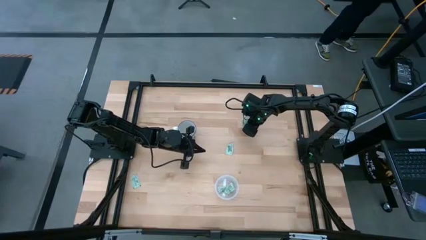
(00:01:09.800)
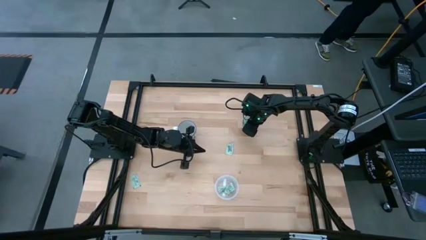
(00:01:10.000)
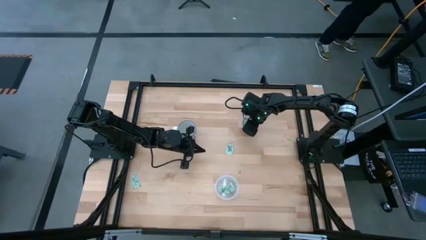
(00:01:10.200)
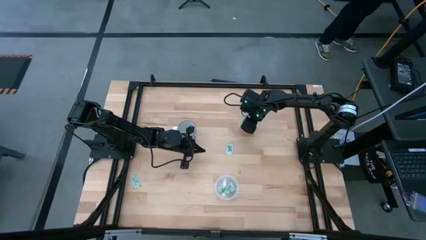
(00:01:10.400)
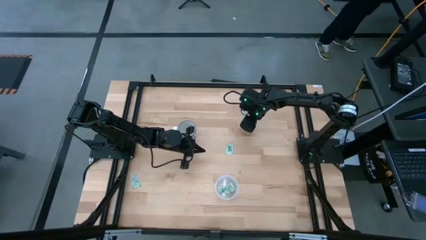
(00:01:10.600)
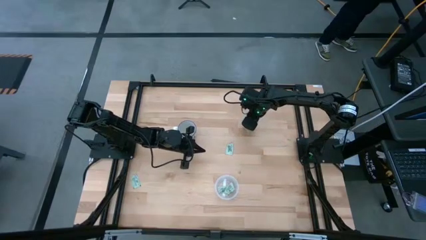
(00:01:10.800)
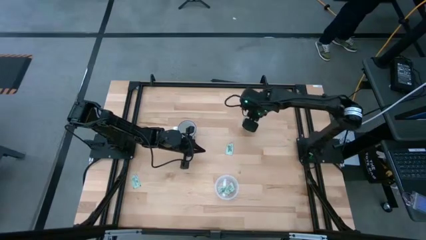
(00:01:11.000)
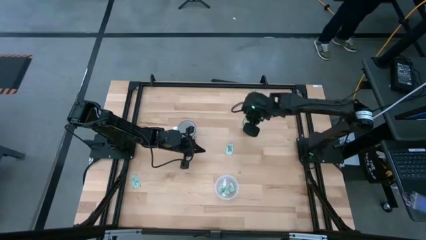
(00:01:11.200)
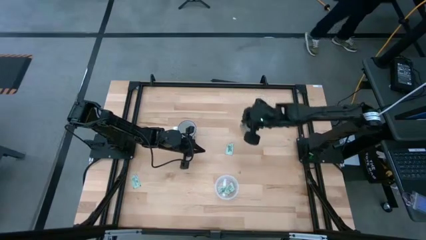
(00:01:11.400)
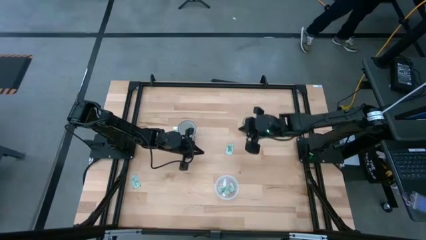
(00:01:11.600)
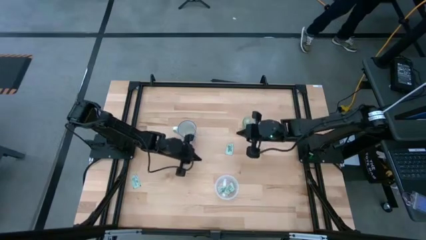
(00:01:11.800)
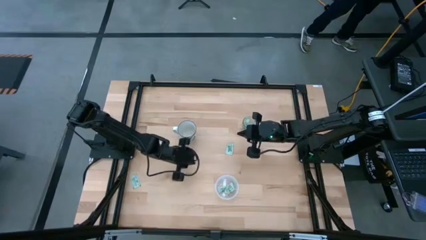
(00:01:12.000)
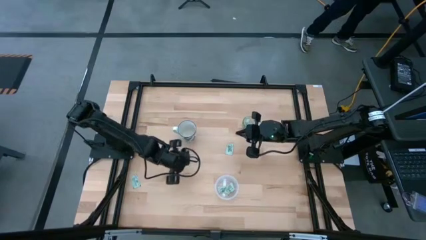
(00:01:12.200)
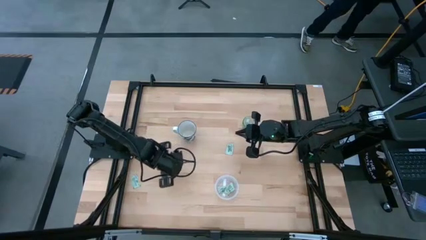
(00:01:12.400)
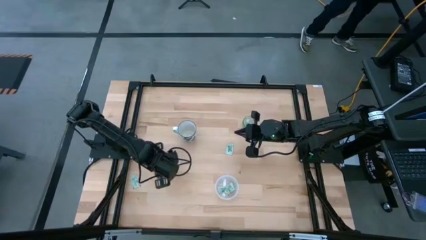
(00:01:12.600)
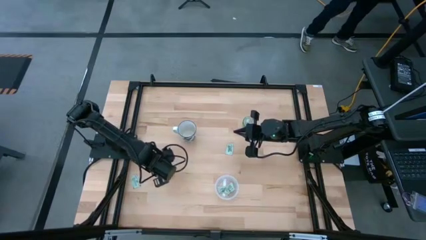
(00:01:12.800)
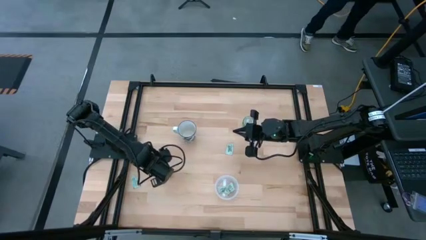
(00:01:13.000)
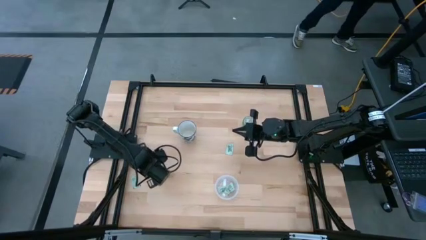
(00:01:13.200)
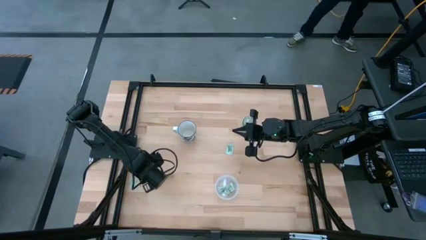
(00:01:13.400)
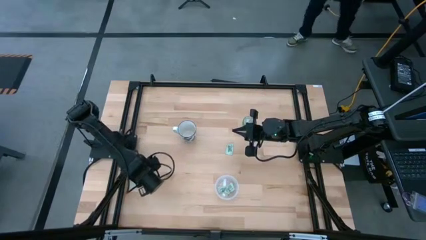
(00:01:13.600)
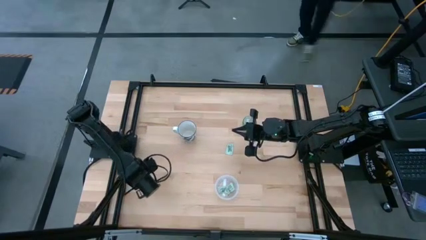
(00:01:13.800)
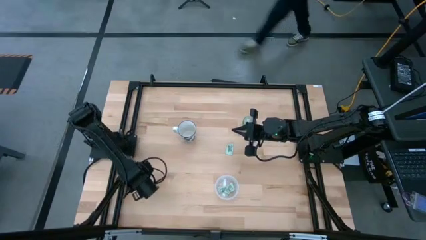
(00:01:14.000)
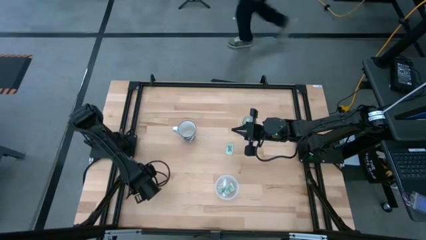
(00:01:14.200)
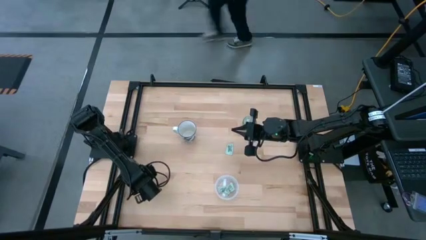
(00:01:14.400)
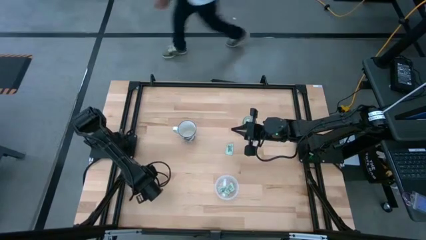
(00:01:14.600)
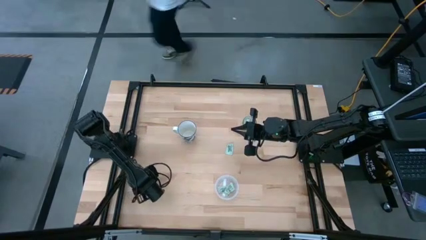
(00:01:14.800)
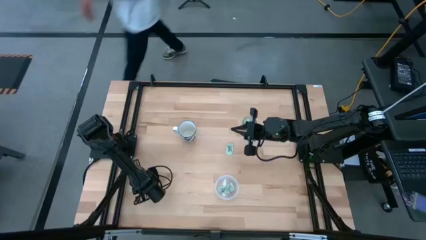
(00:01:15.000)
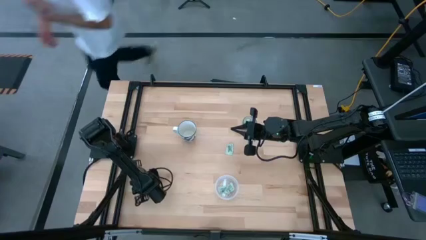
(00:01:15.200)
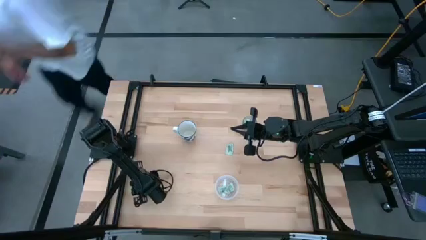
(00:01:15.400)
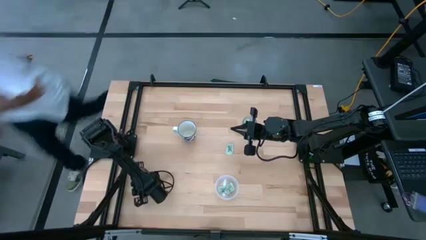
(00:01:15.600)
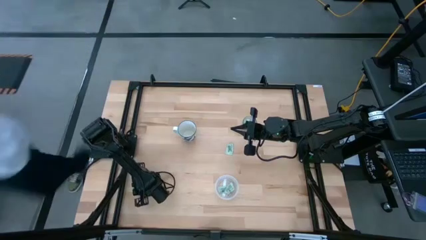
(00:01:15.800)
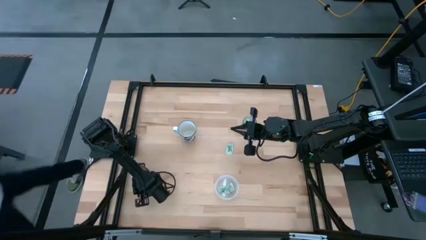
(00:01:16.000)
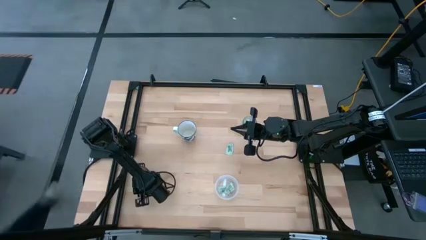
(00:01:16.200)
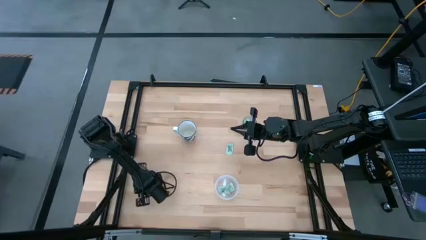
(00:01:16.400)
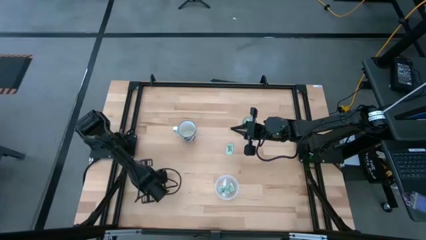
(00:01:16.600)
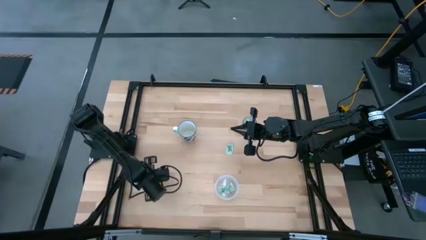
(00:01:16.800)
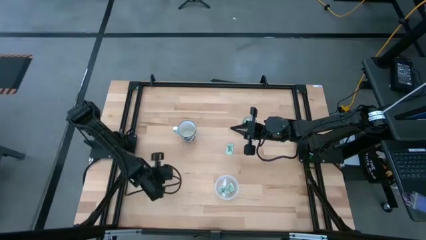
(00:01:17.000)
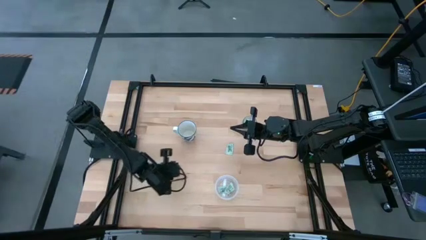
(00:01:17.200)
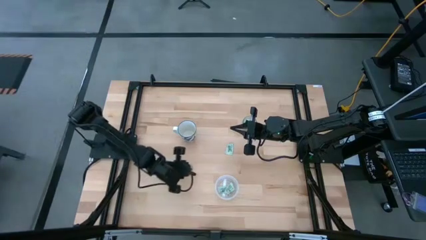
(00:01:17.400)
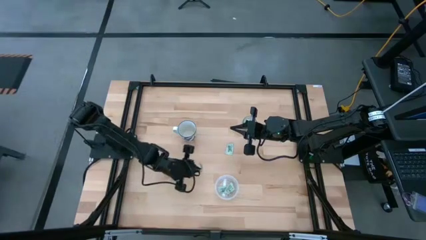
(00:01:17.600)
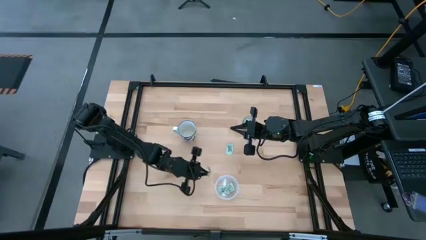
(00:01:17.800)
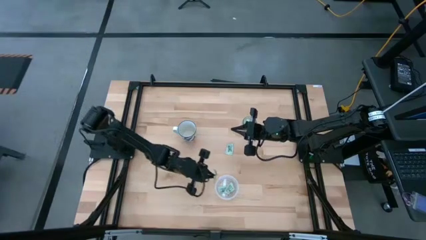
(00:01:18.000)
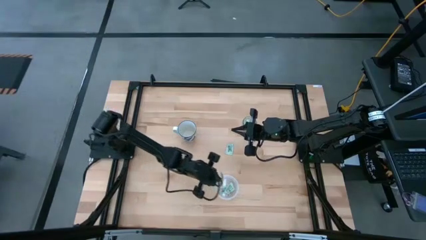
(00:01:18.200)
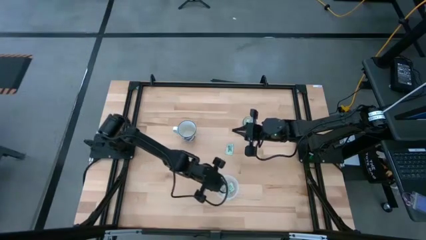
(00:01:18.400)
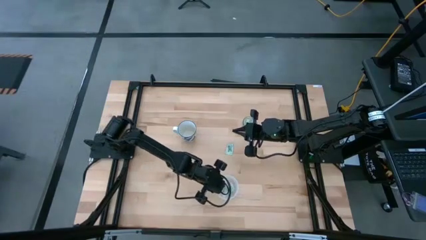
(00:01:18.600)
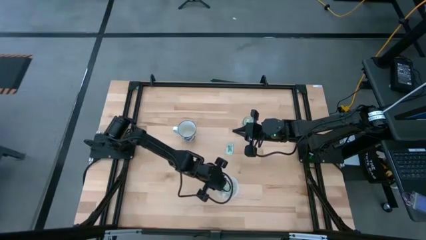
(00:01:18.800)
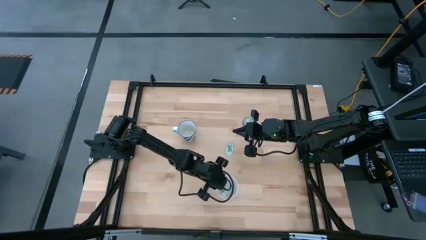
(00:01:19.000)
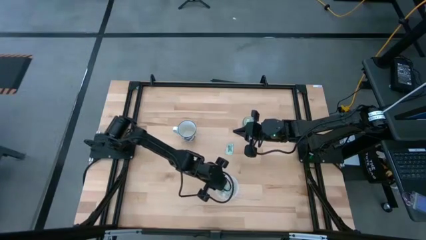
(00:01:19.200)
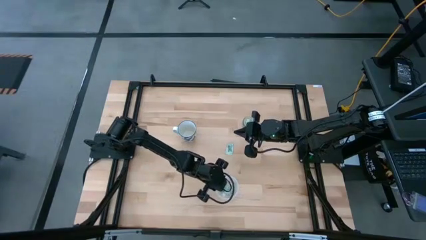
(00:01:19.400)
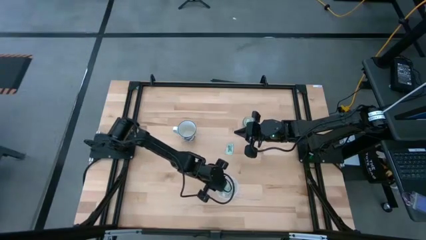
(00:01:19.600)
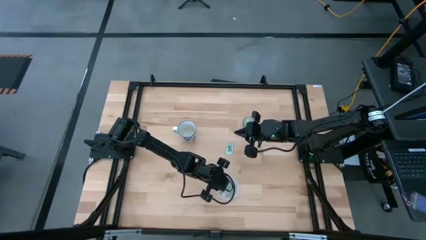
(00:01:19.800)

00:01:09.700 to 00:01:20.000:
Task: Pick and place Stevia / Truvia into bins
Put the white stevia packet into the transparent container
